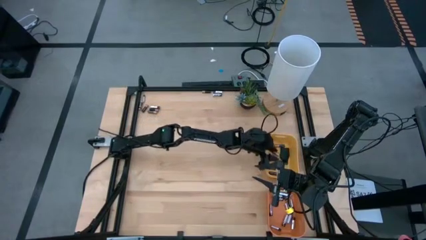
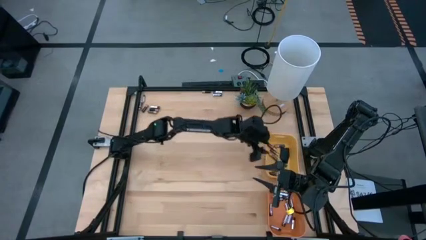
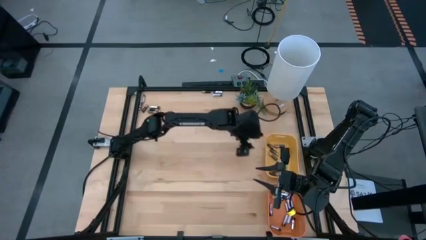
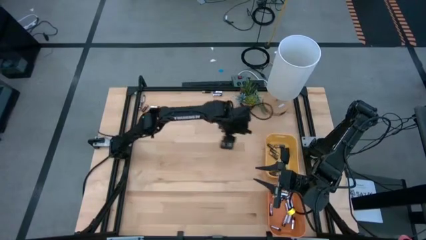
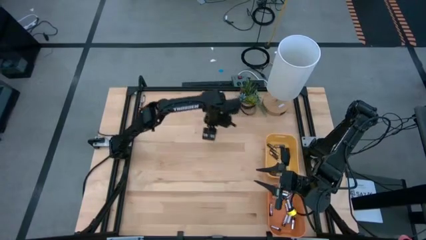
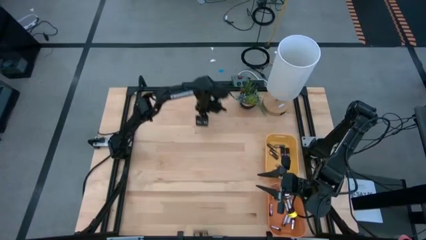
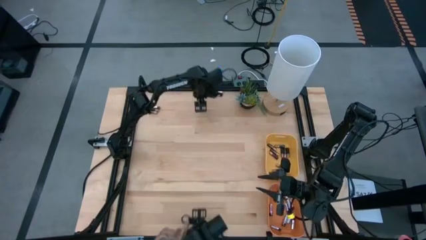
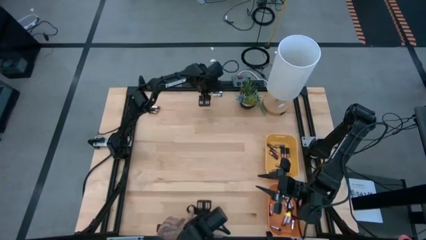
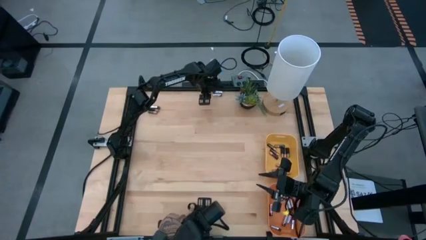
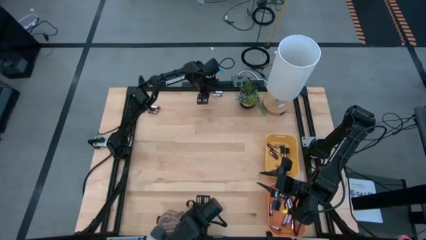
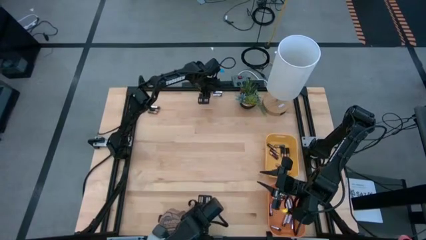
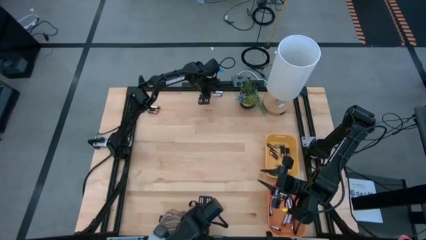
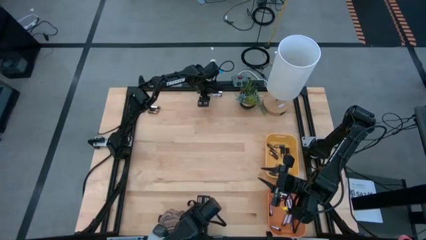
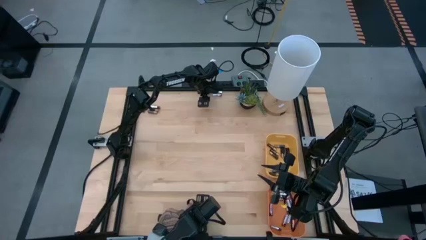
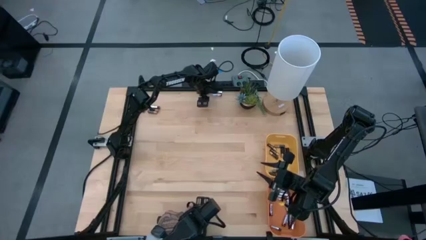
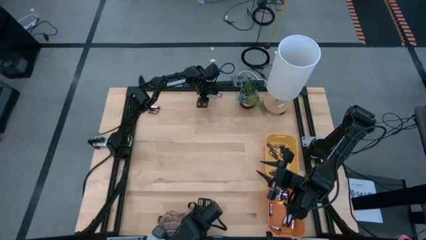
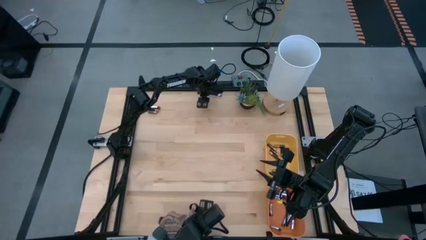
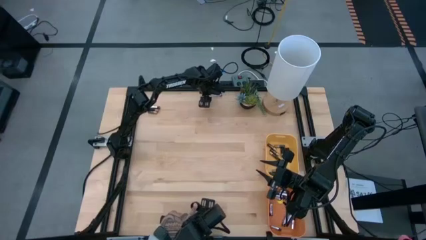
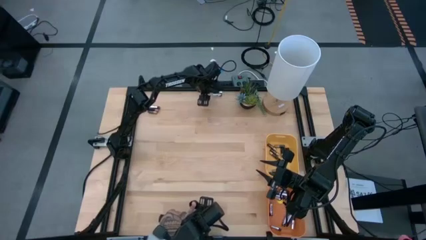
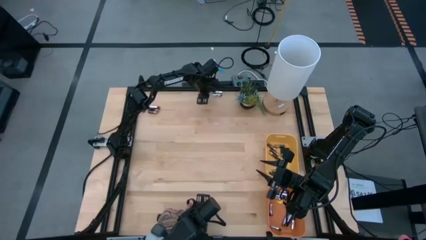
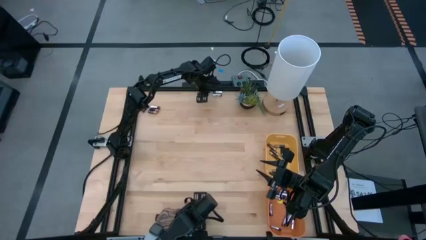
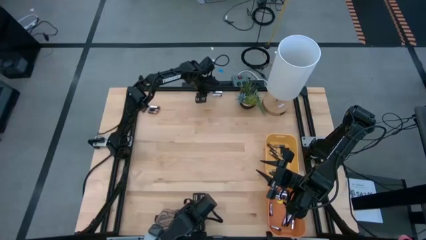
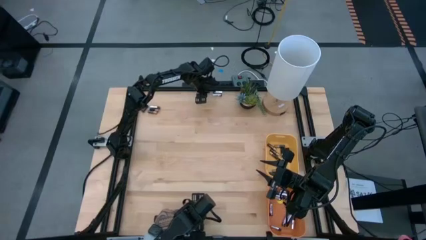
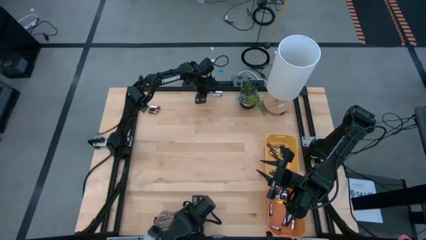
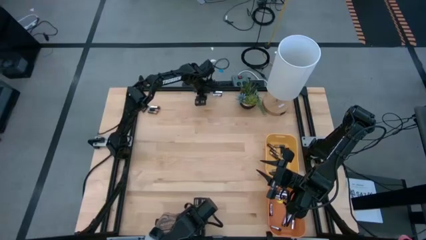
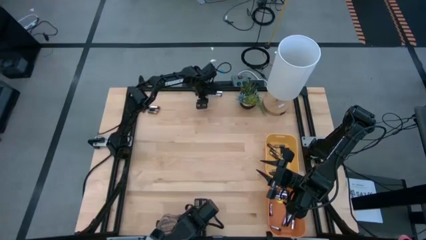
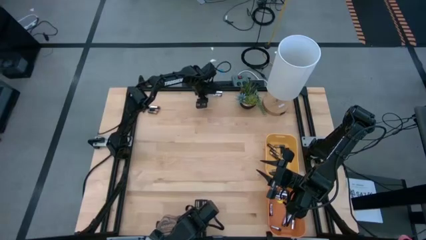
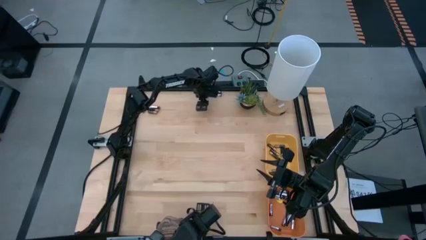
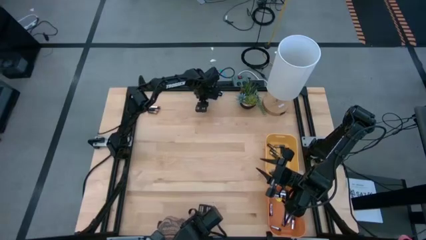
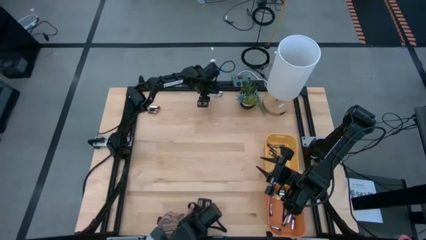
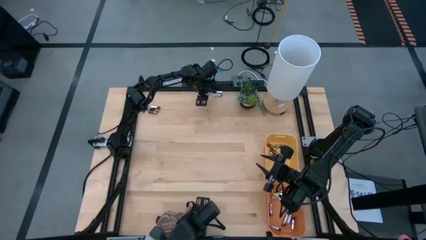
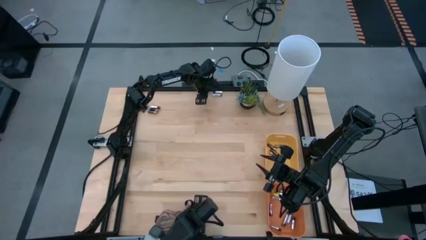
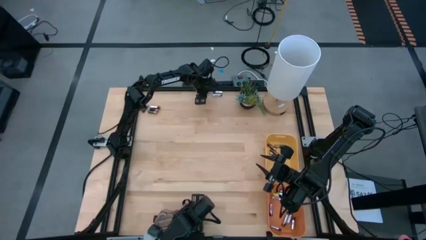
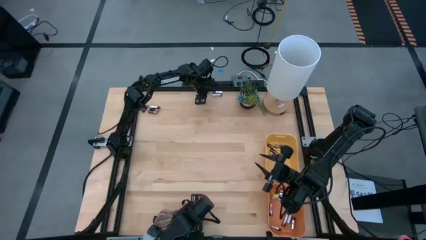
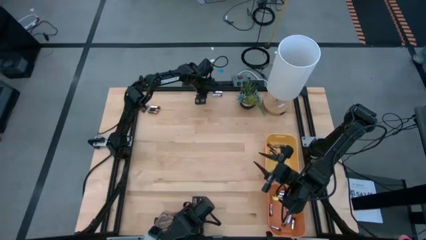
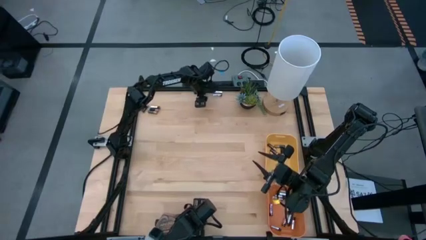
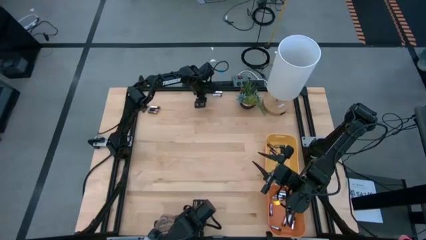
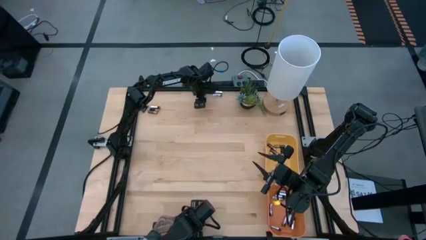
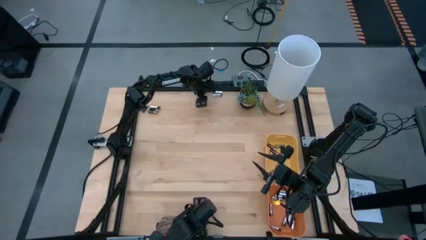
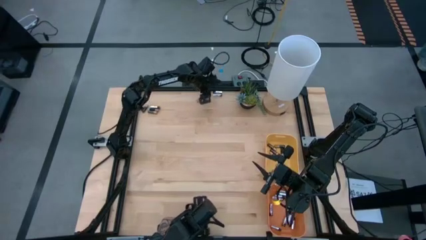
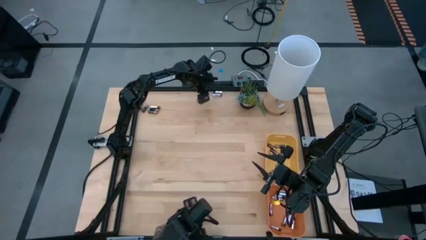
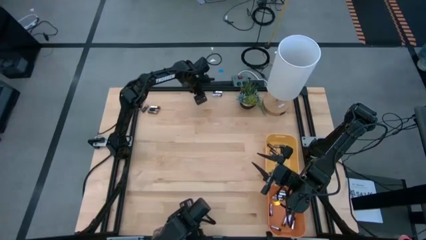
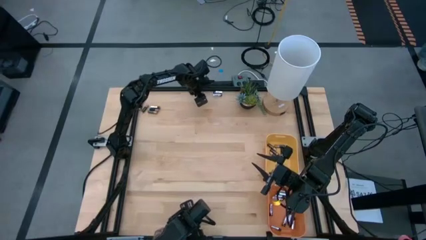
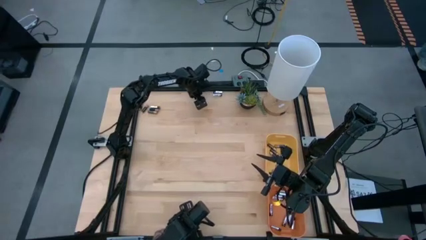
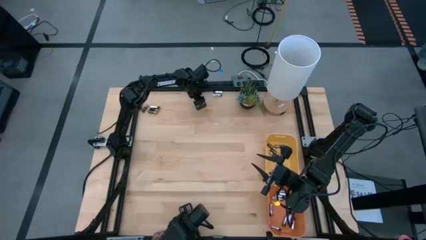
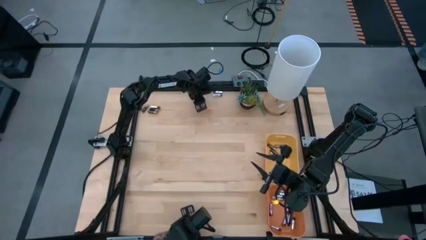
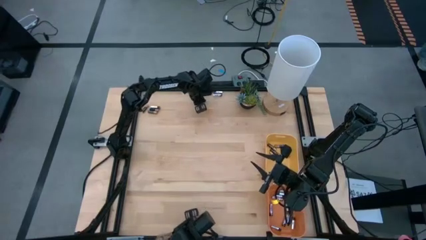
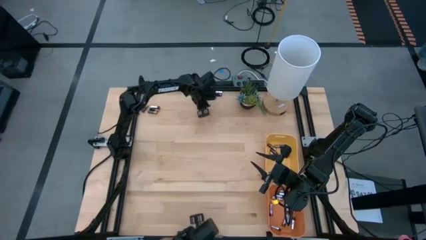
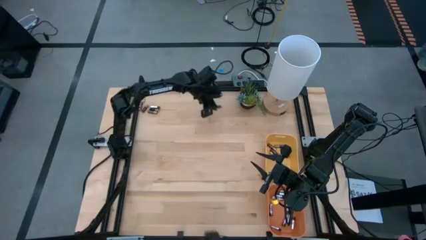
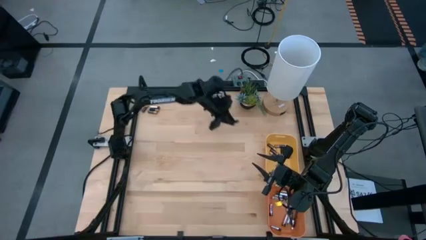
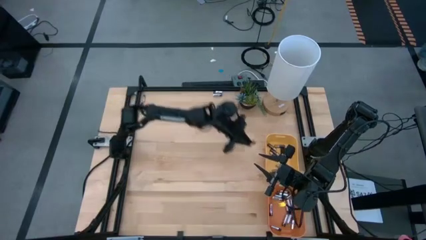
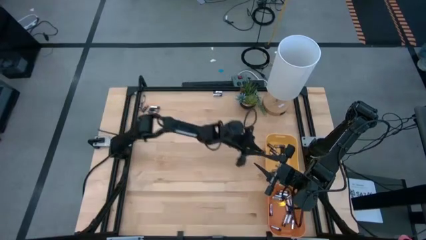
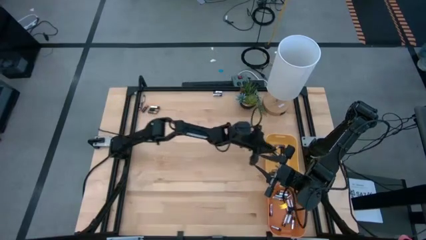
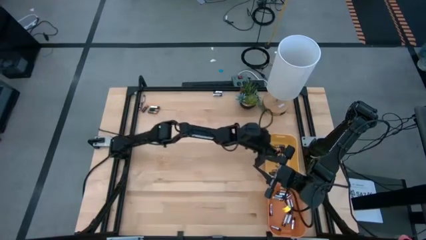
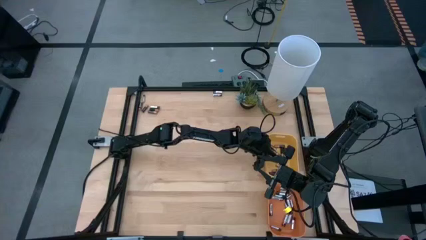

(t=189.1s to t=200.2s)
Task: Sort batteries
Put the brown battery into the yellow bin

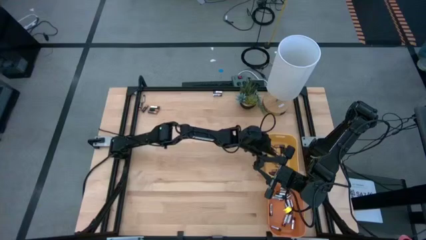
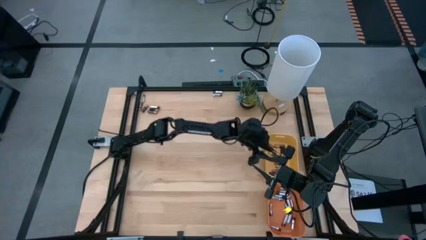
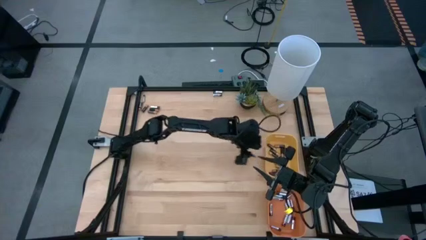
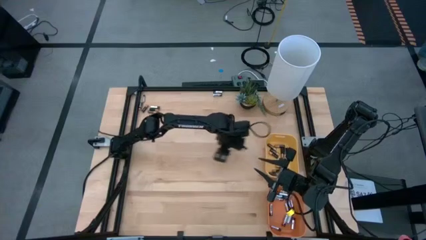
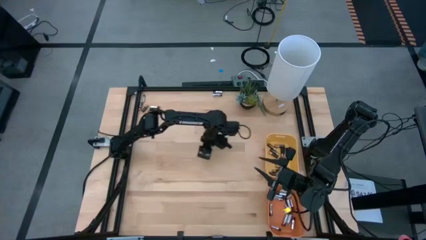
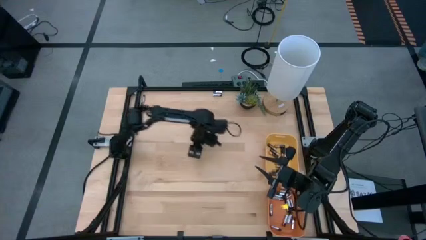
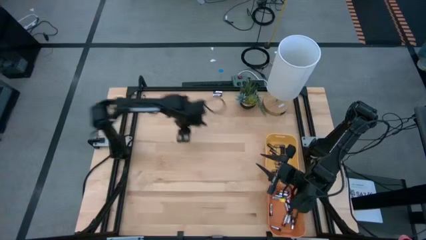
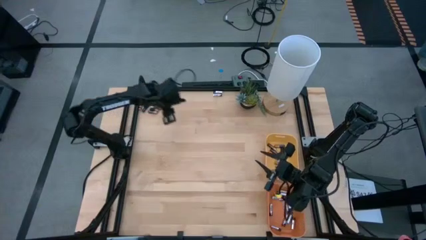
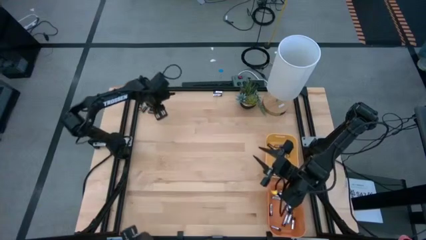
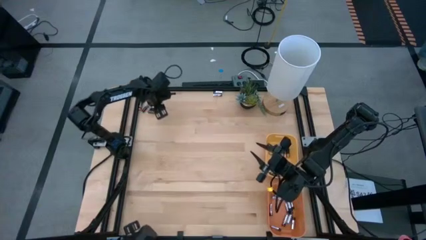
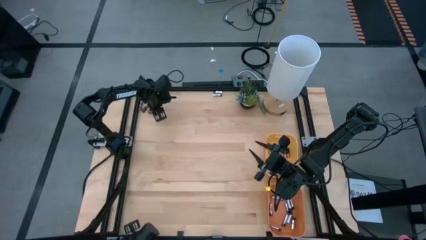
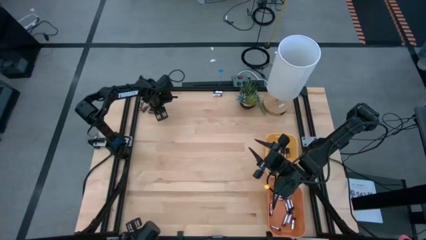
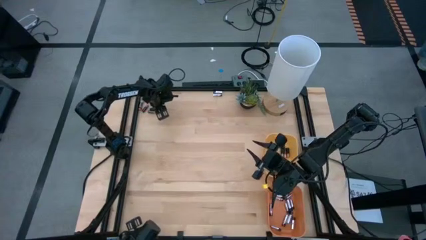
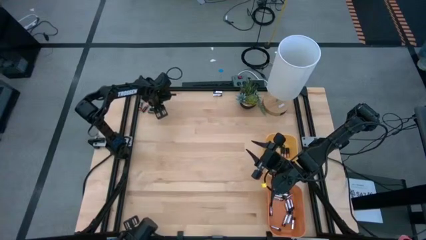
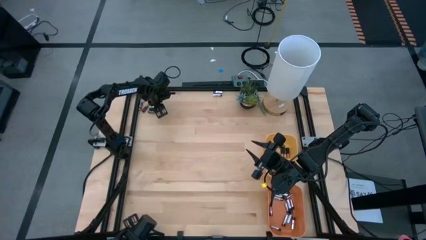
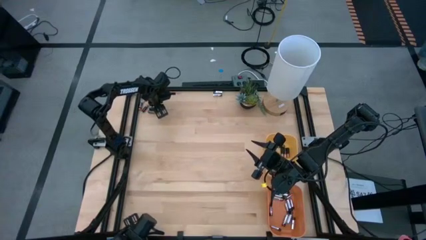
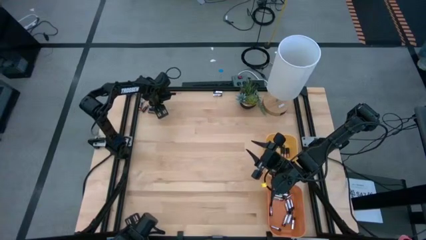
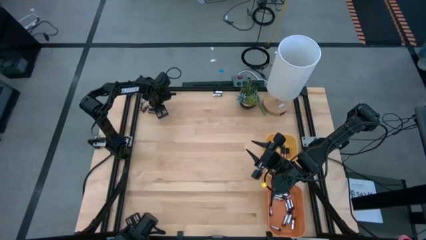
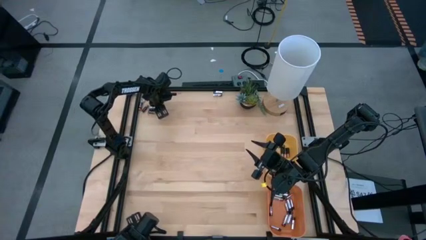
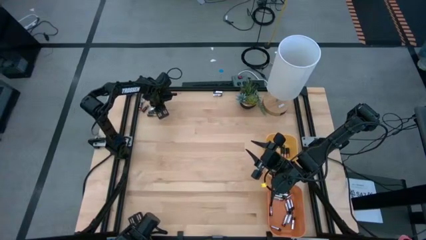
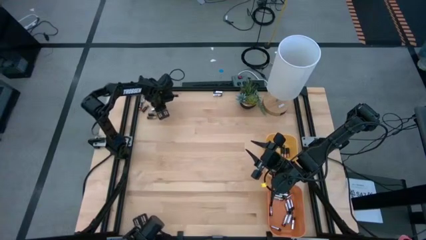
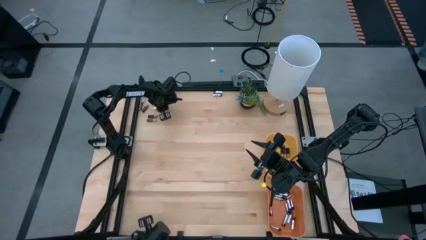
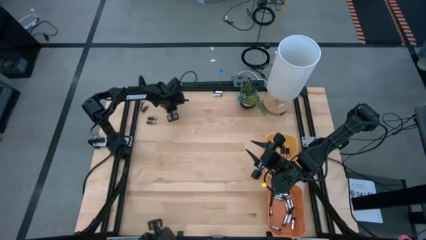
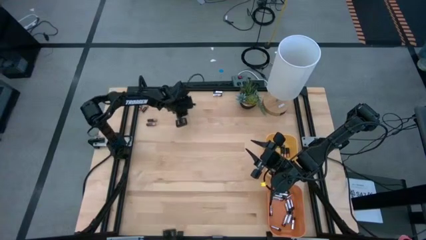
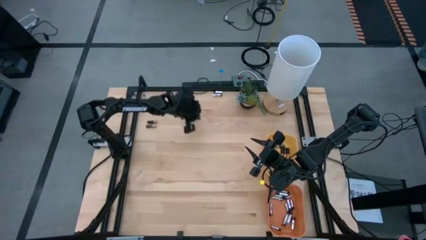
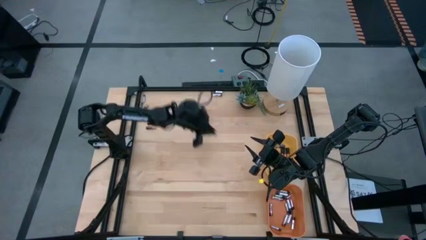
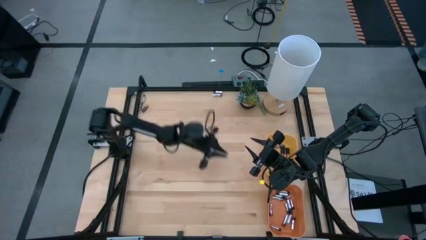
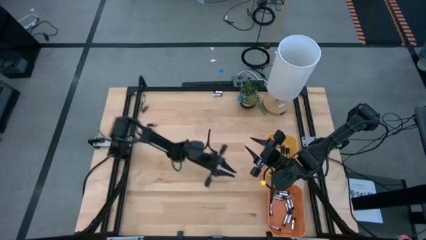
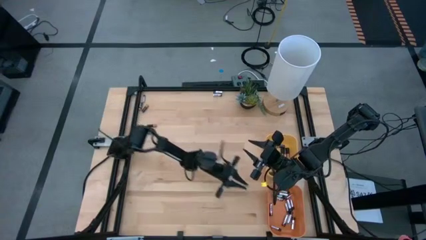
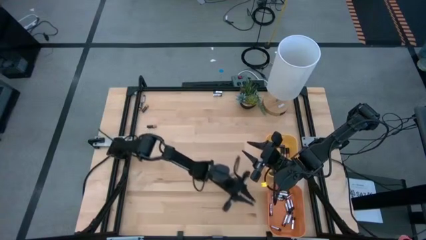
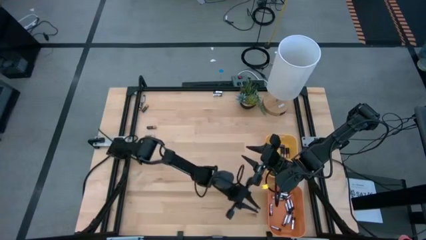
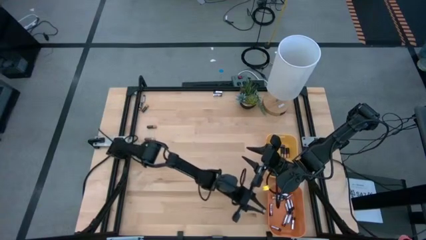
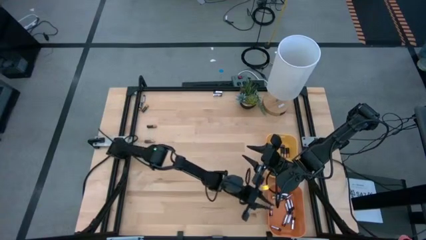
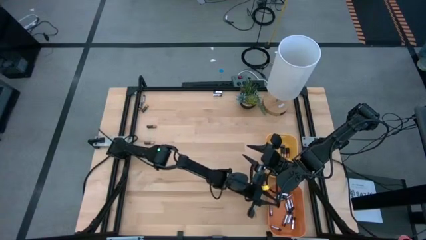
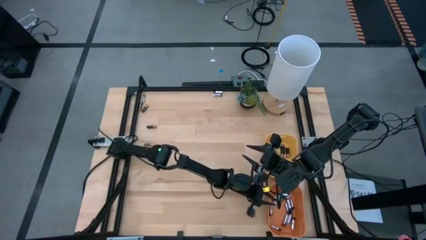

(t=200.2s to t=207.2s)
Put the black battery into the orange bin
